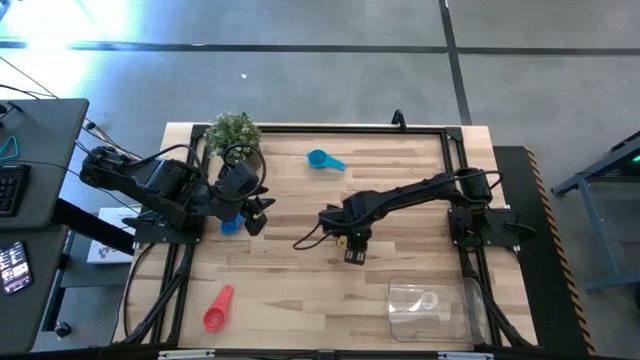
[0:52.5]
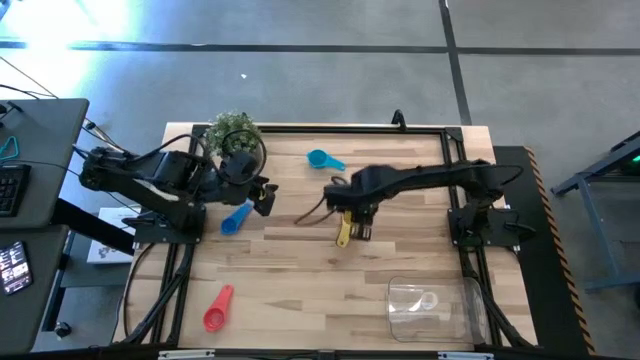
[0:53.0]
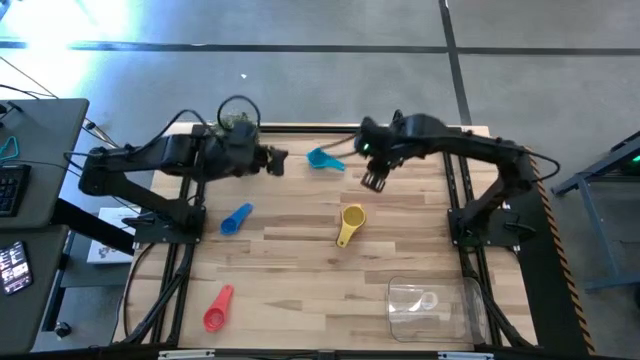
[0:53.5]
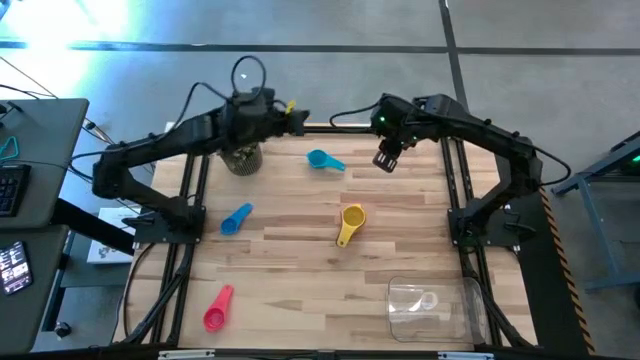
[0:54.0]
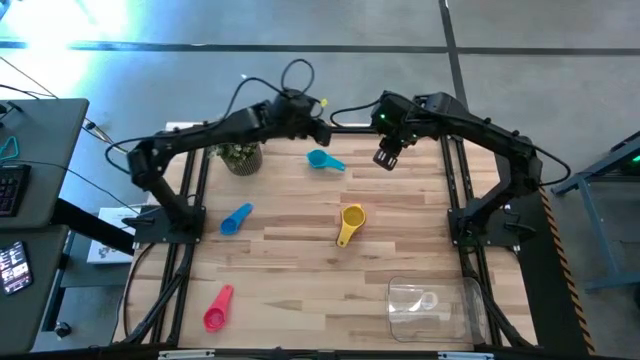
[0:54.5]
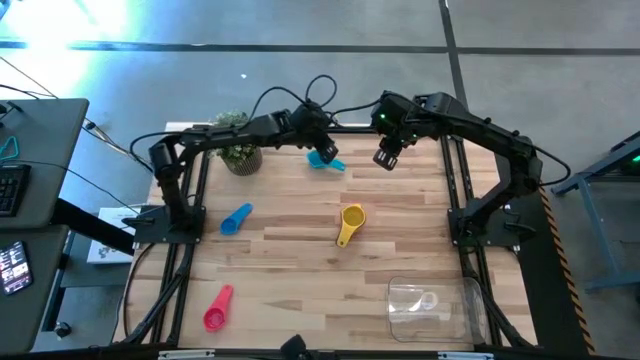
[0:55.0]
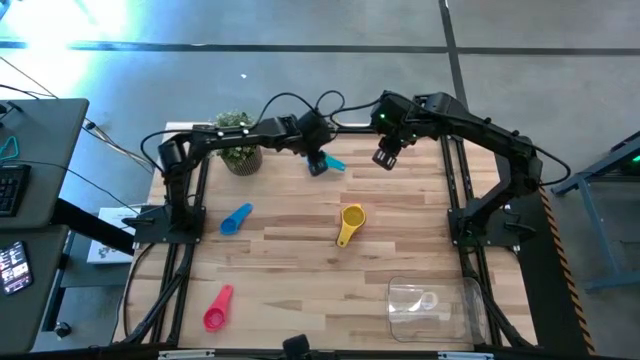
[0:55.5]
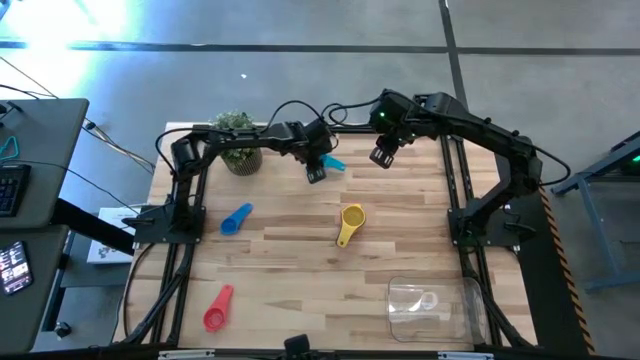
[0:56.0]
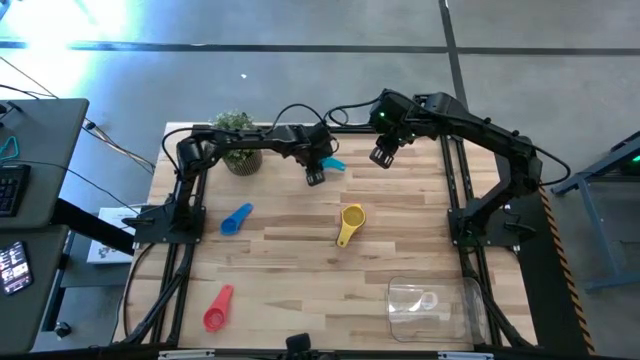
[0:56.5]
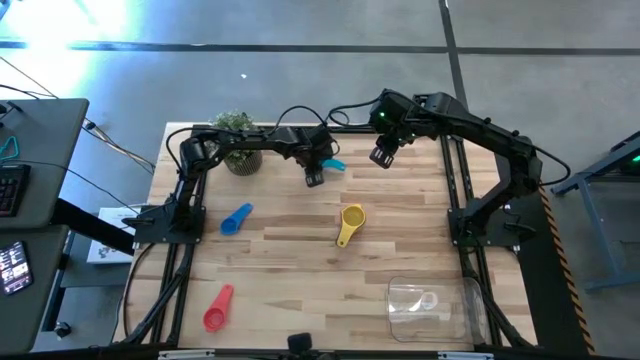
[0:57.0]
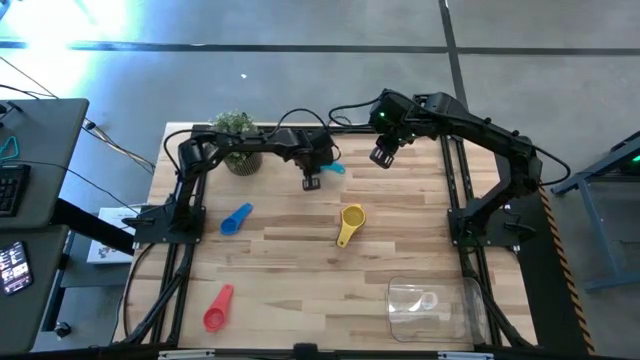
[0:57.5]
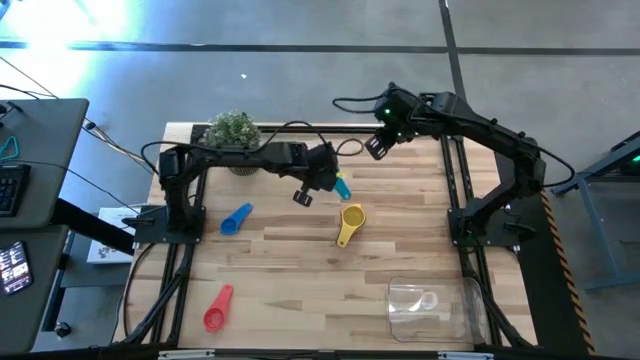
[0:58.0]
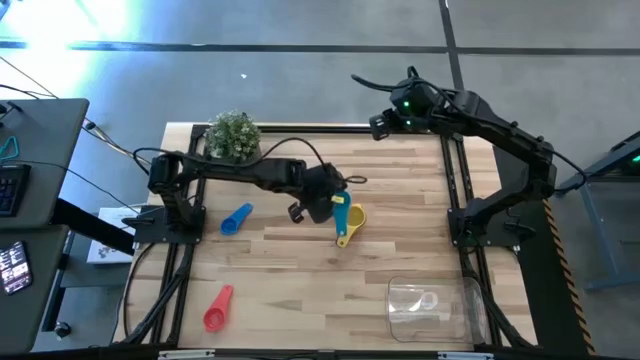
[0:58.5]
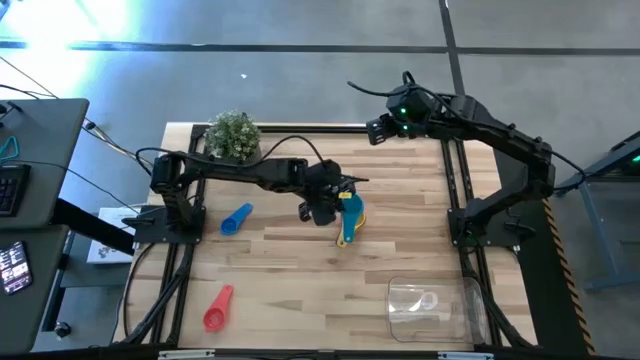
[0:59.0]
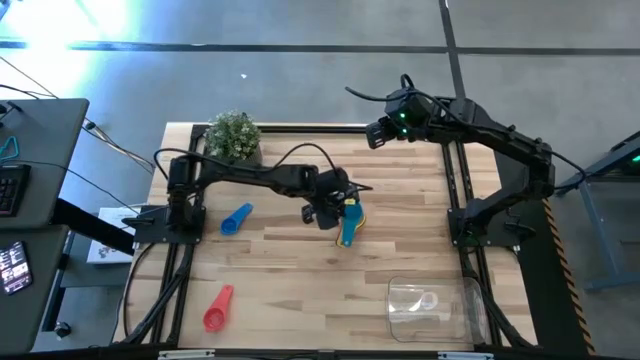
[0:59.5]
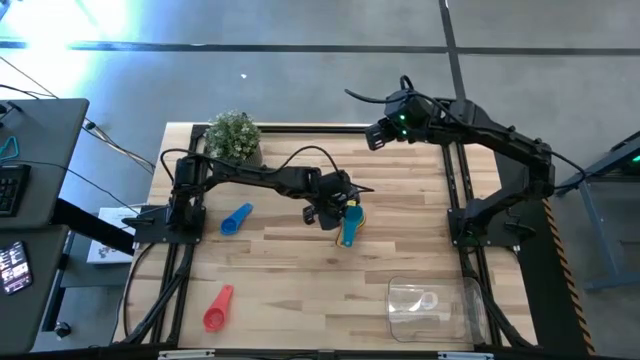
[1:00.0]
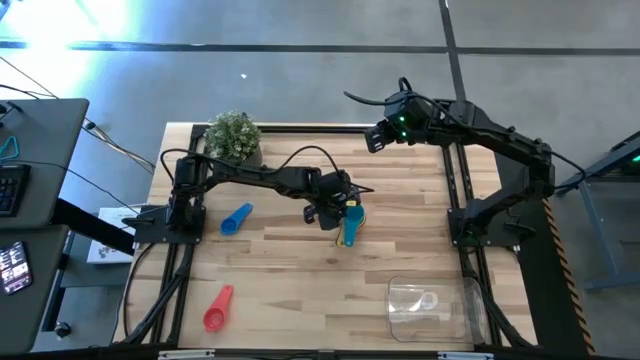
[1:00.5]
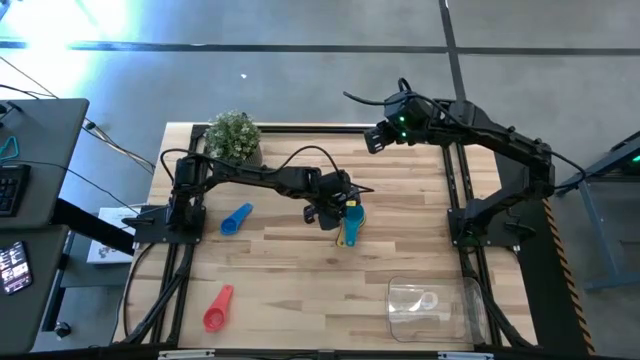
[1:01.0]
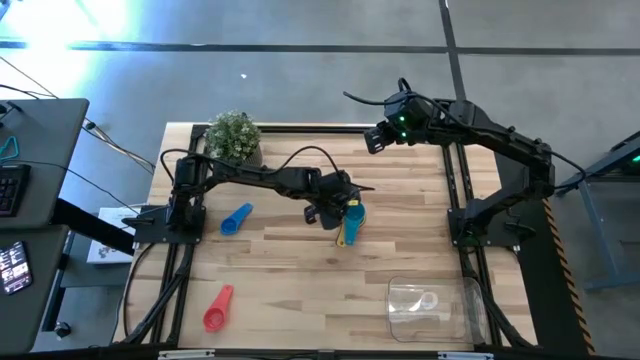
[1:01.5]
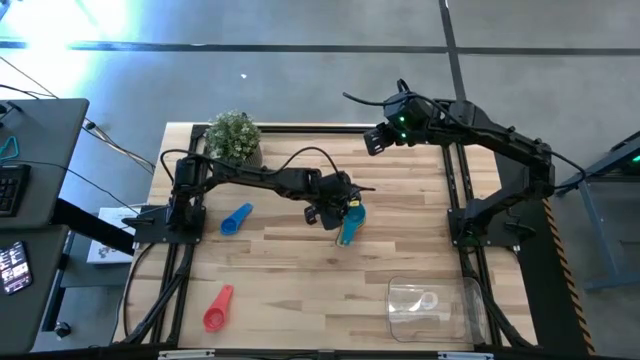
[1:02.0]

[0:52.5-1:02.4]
Task: Nest measuring cups in basket
Stack the light blue measuring cup on top of the yellow measuring cup

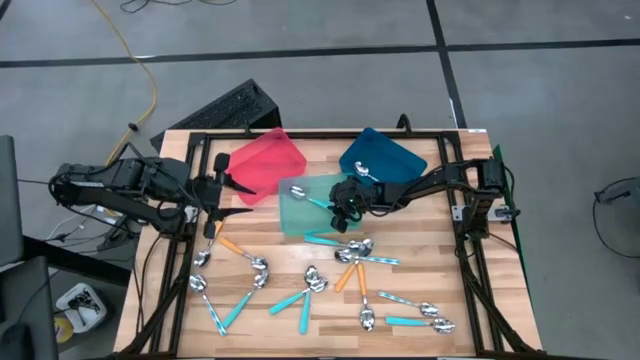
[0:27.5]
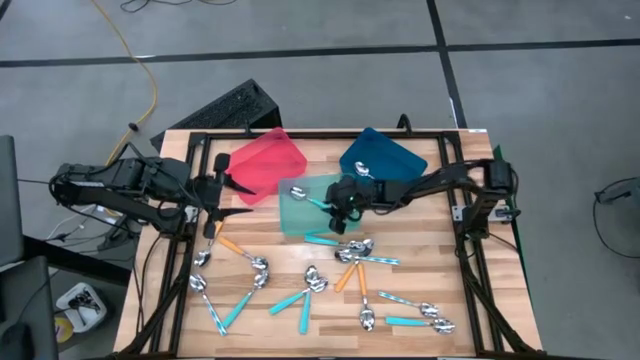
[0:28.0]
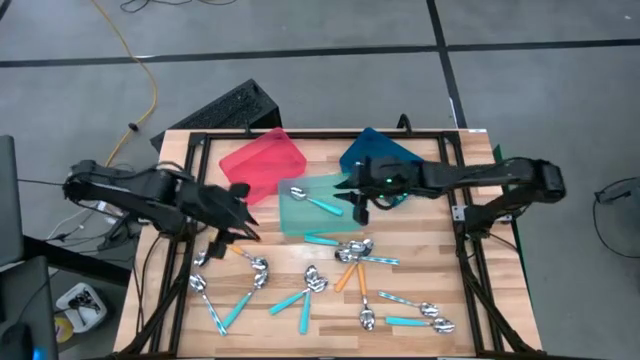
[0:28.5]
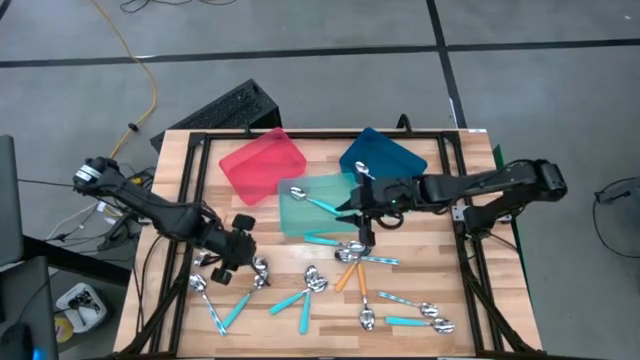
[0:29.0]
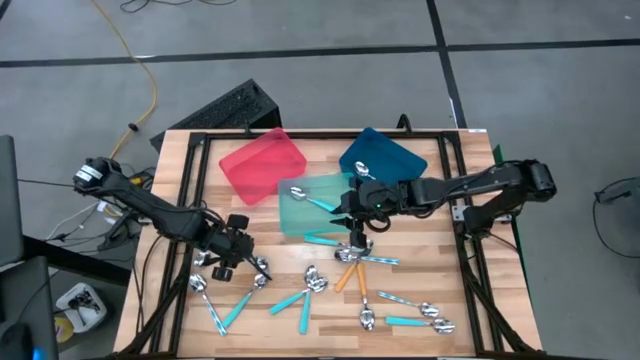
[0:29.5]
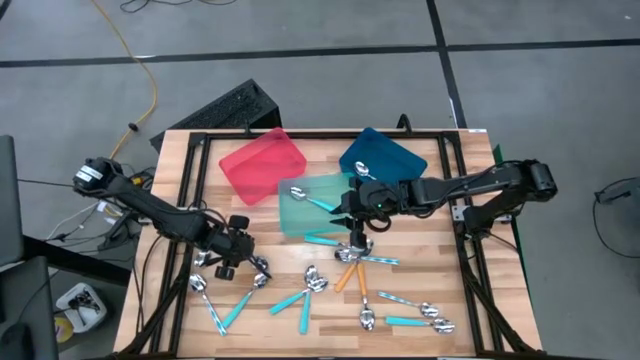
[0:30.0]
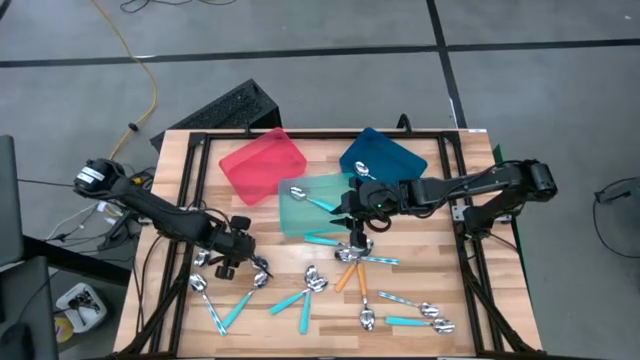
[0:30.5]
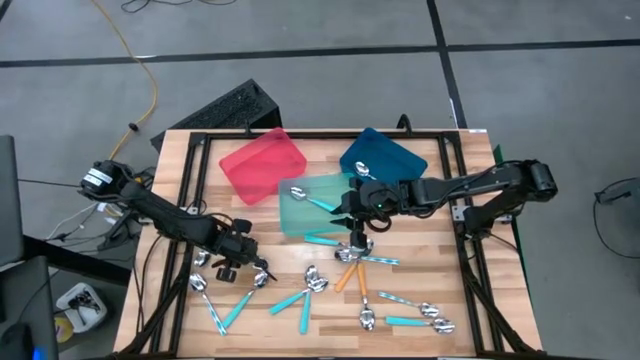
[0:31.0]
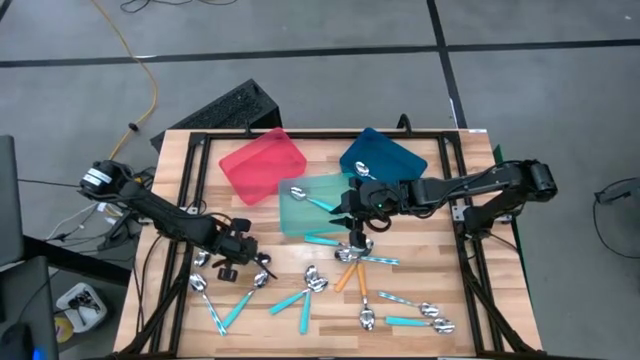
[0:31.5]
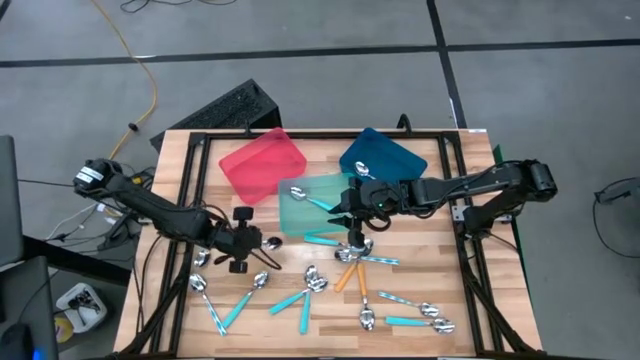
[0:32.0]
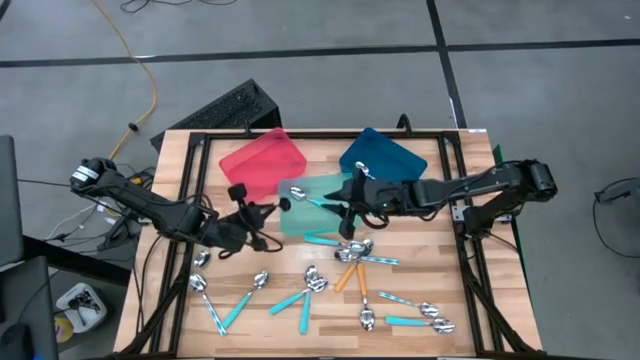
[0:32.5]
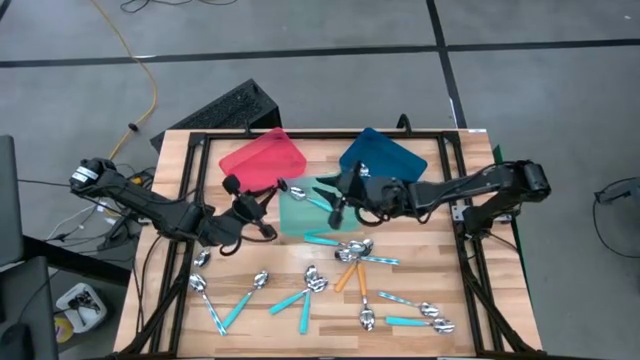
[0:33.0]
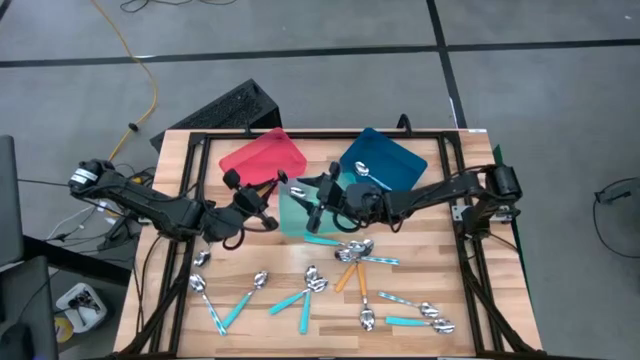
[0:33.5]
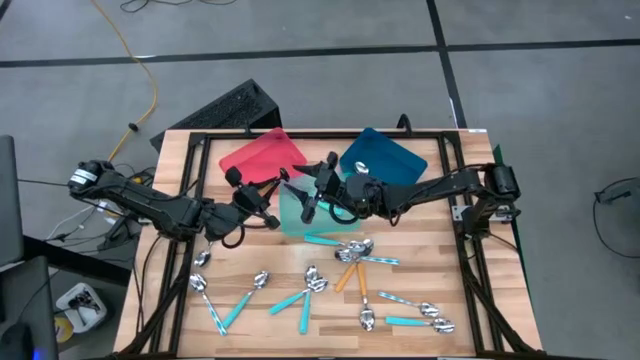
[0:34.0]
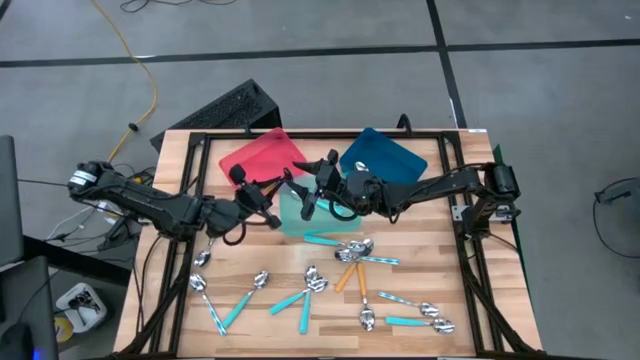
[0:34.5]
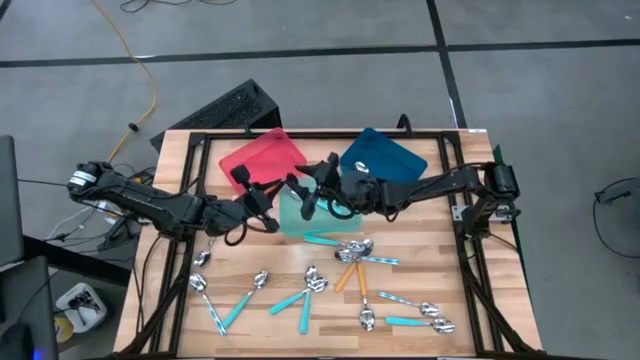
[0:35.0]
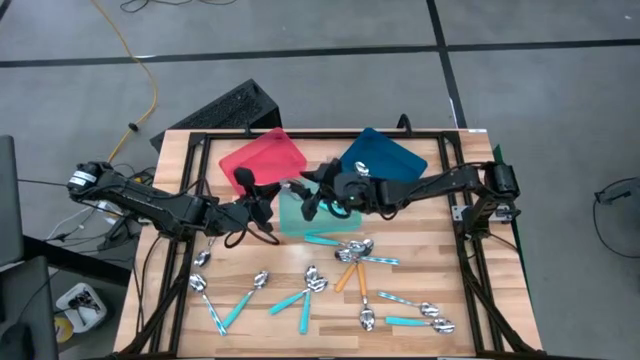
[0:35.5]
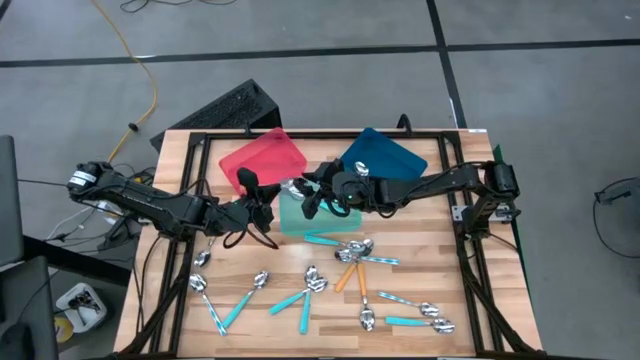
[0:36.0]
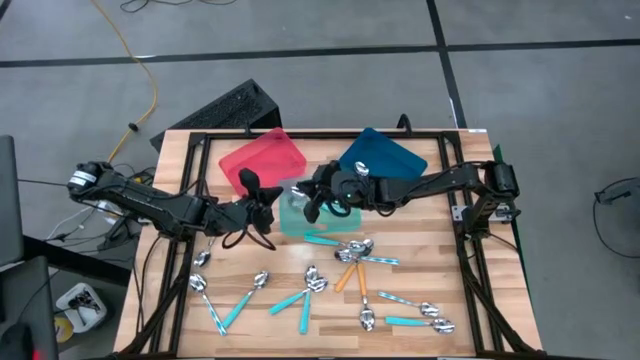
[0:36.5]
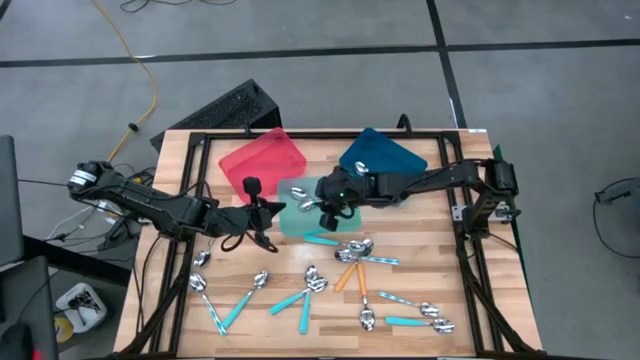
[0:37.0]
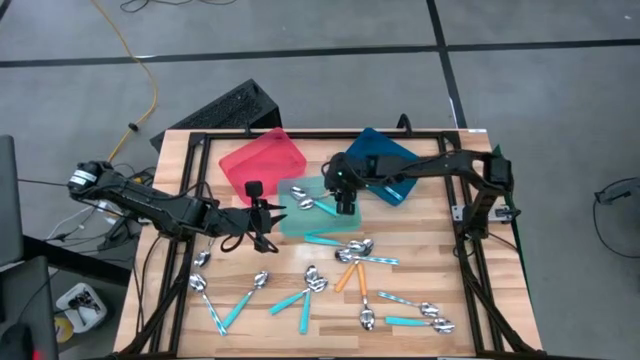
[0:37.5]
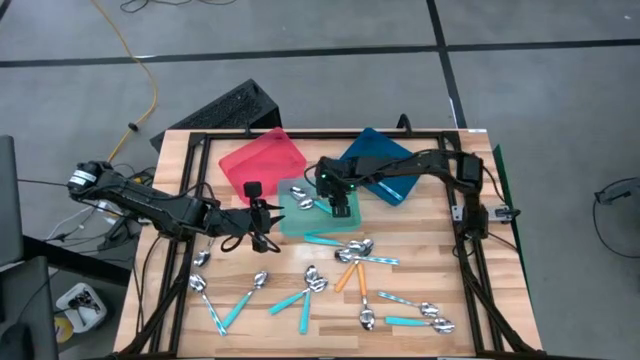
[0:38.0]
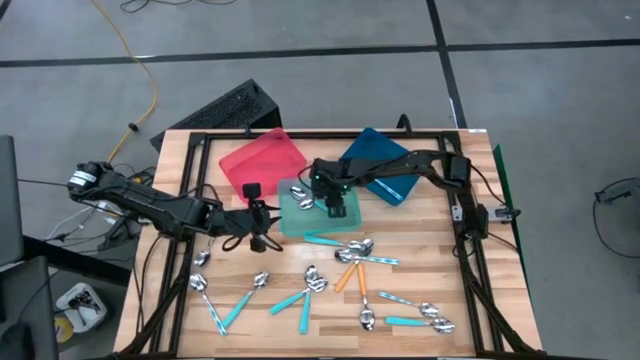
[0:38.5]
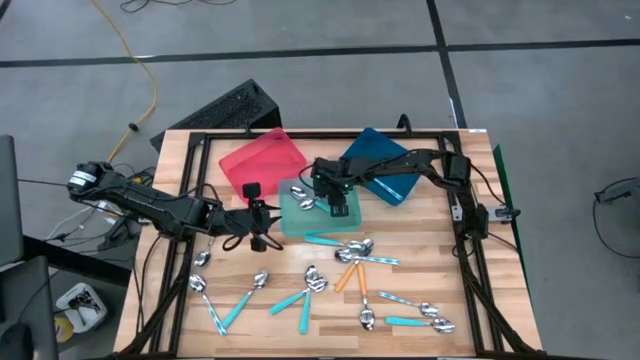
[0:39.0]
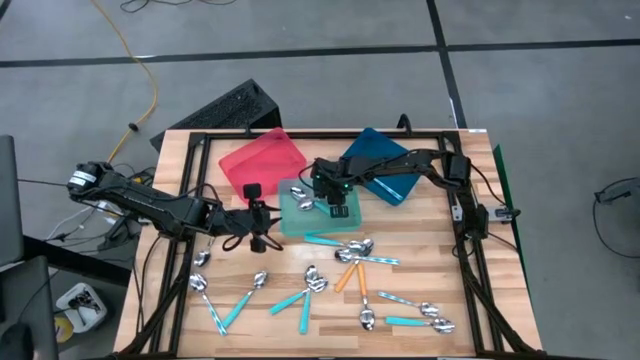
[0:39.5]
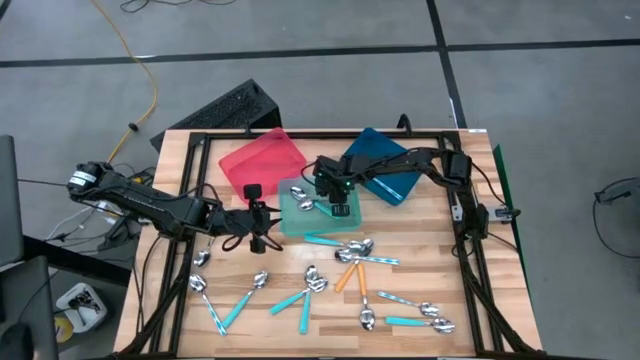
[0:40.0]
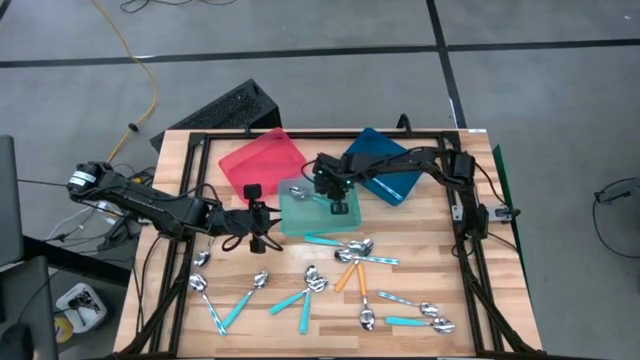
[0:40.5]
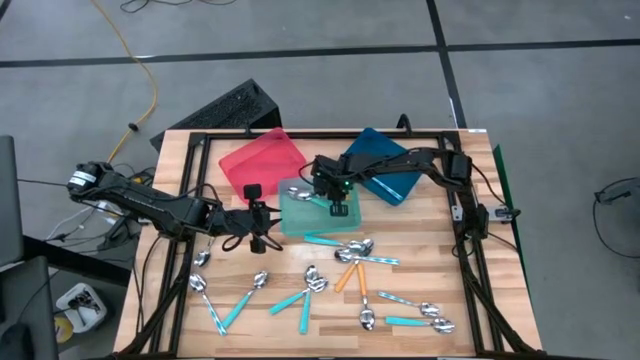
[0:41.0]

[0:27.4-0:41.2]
Task: Sort silverware by color (type)
Put the orange spoon into the red bin
